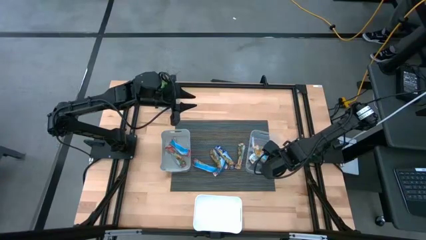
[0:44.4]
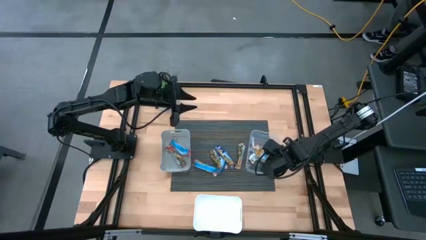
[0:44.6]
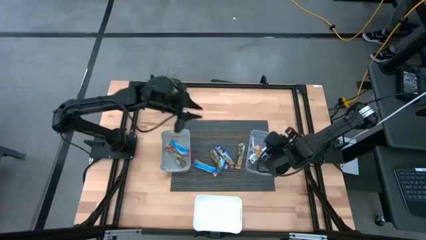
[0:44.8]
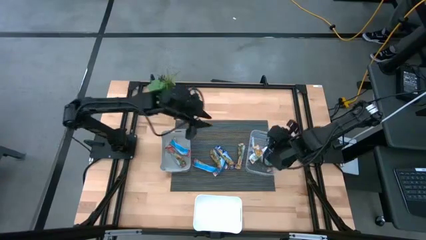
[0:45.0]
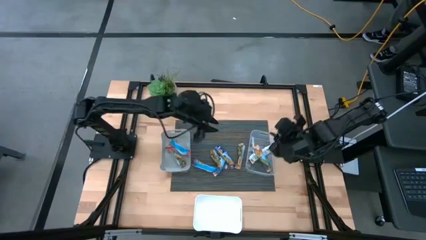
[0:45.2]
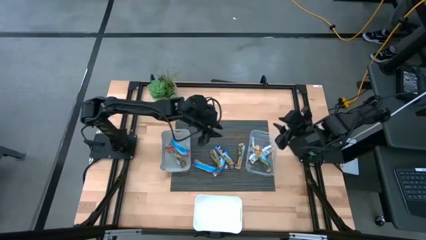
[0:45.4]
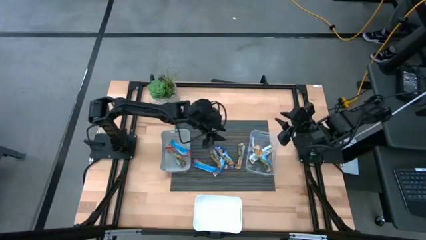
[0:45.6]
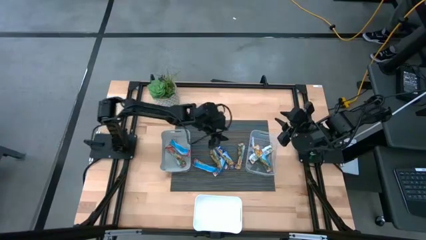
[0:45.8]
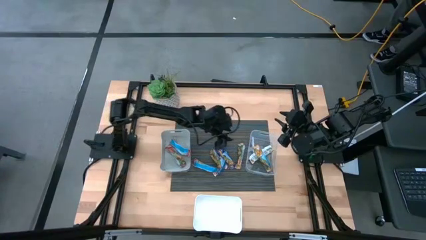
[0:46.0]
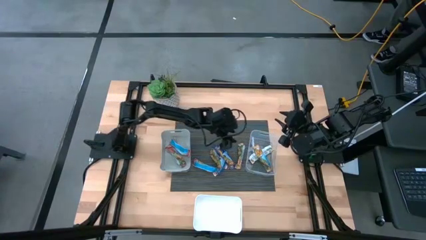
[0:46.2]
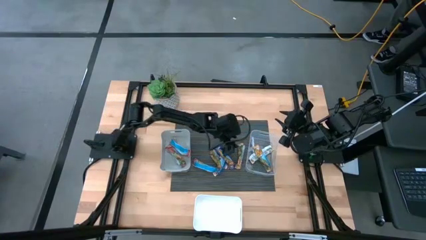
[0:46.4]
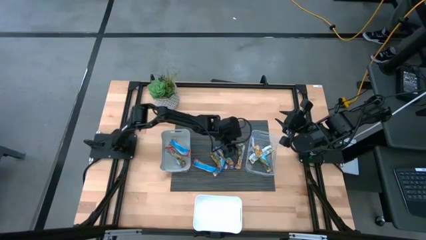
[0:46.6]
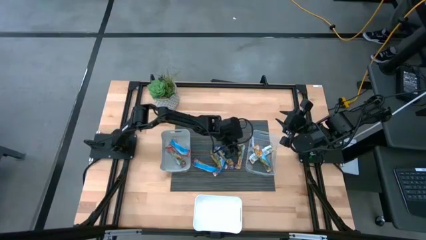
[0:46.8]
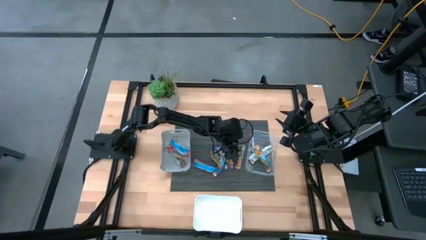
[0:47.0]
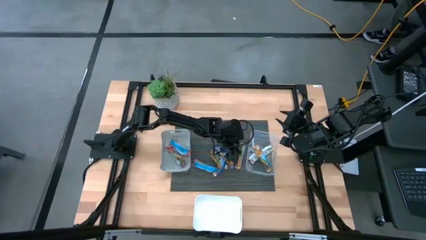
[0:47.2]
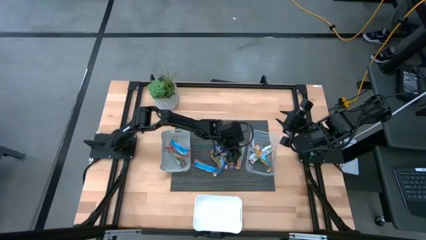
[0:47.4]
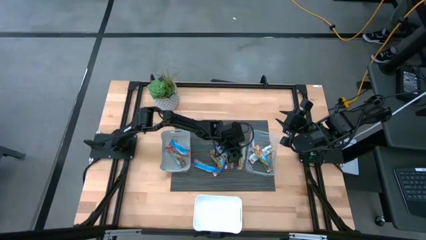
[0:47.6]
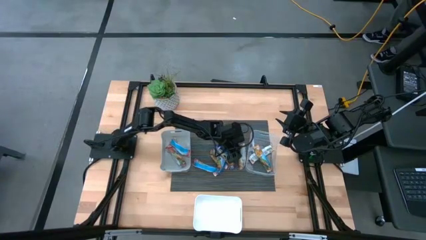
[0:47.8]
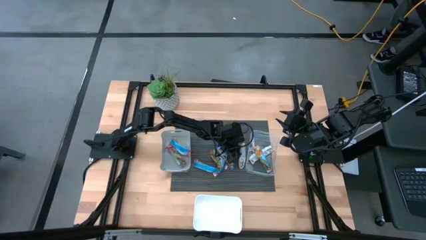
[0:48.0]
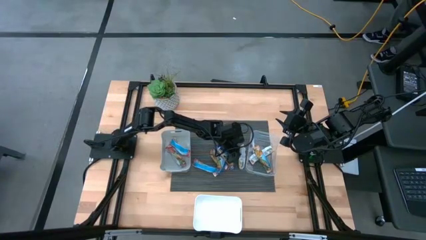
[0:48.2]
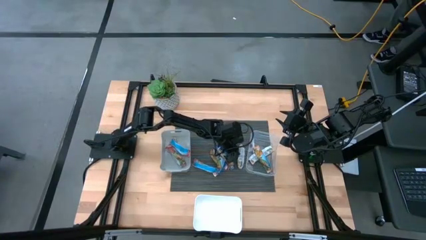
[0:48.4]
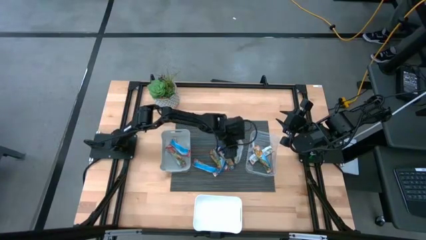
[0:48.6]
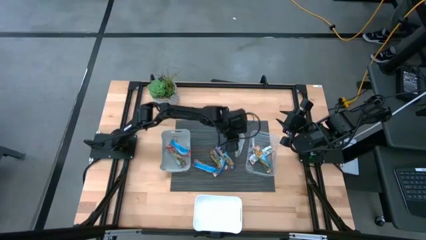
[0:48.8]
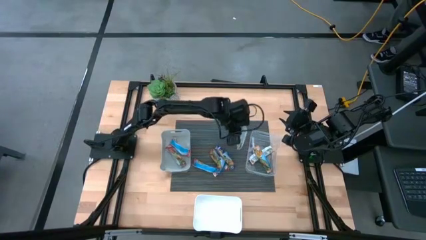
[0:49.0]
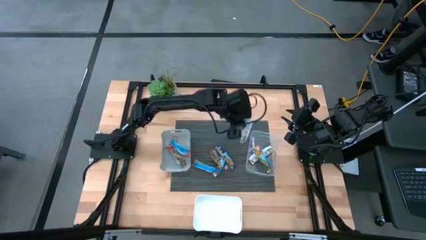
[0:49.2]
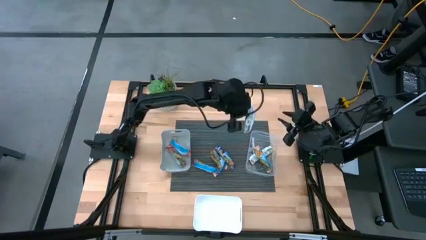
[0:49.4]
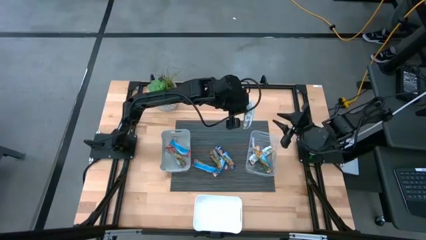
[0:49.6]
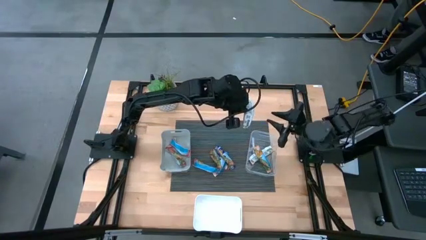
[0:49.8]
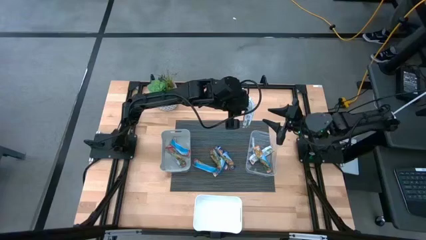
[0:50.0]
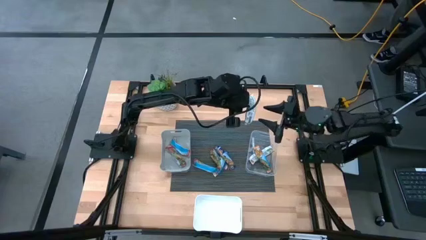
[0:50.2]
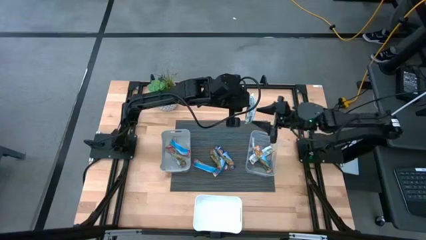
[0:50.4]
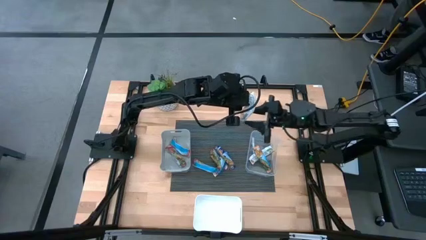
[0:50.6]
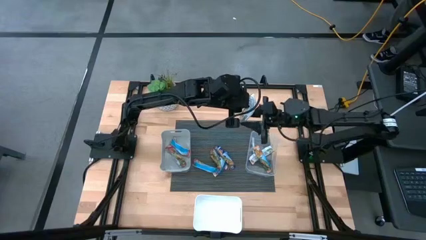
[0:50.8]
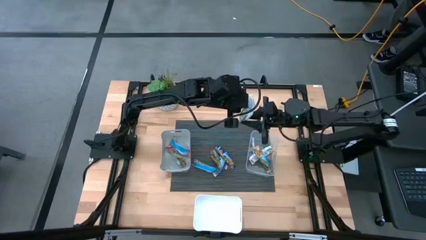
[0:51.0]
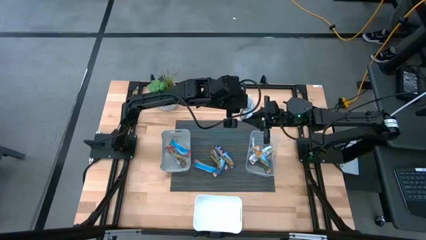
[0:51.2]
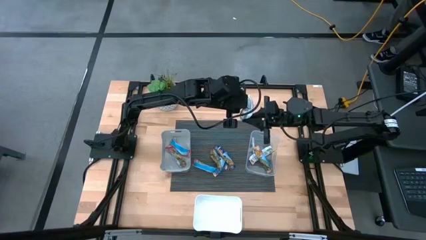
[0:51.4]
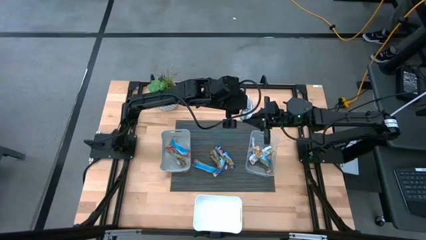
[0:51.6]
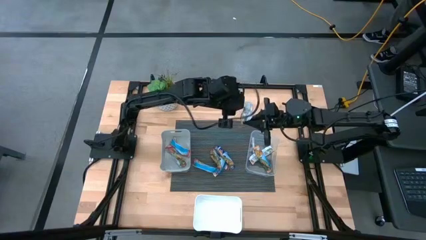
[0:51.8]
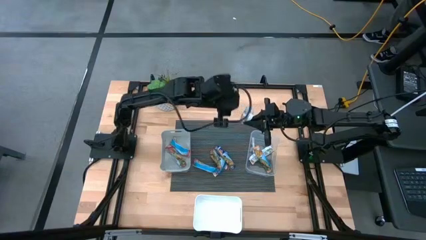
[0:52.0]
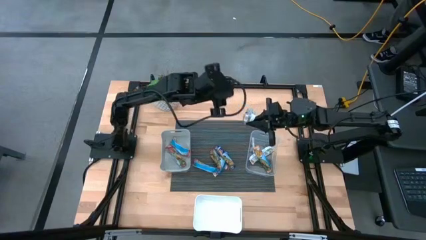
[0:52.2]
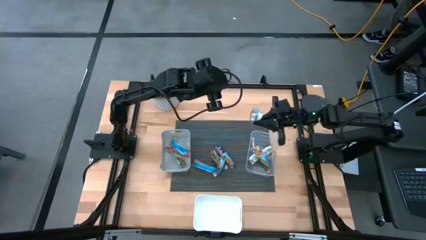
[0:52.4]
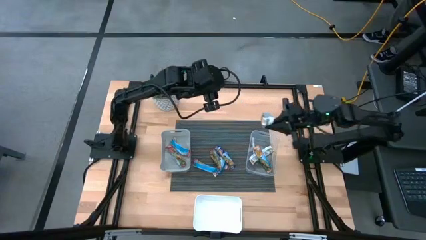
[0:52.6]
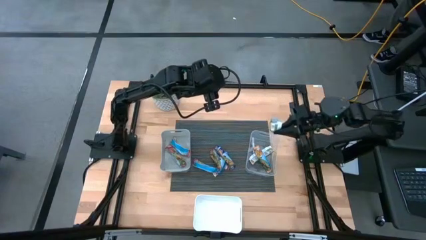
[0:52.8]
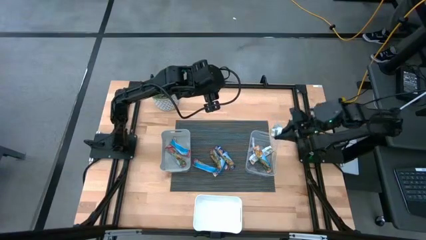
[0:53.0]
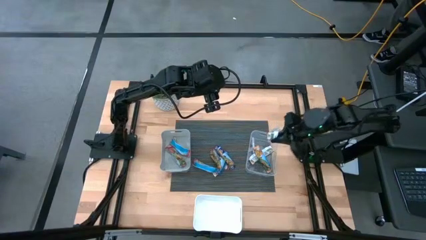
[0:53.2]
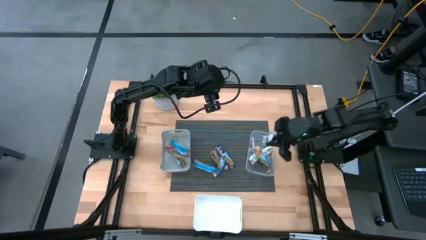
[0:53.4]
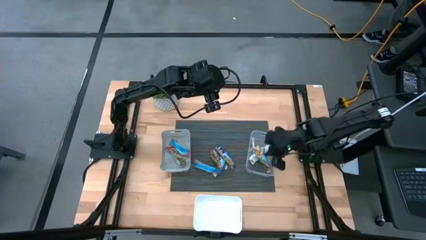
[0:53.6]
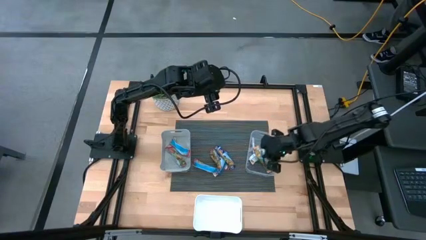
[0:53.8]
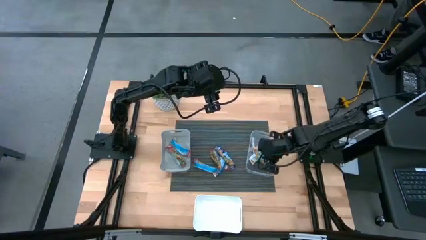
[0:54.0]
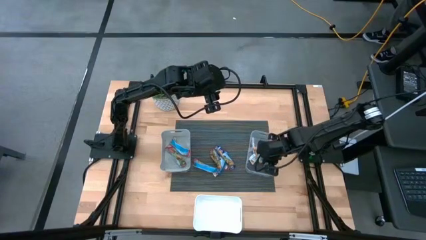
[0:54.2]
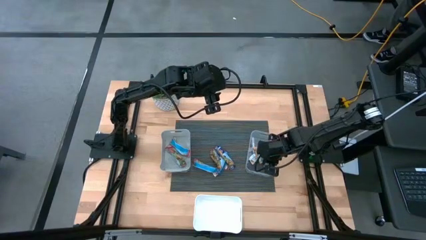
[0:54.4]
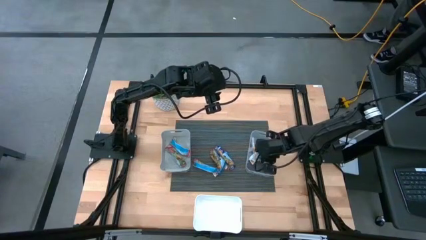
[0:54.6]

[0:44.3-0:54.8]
Task: Pick and place Granola Bars by type
Put the yellow granola bar into the transparent bin

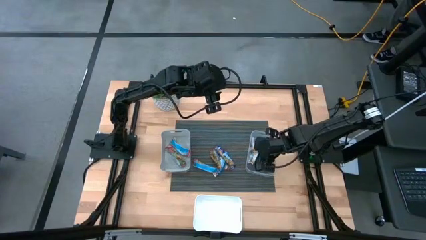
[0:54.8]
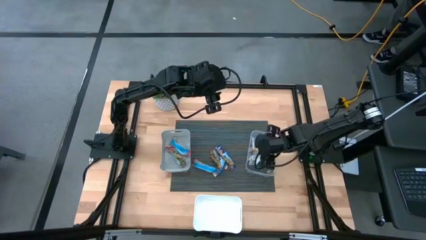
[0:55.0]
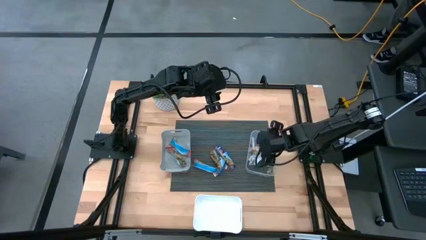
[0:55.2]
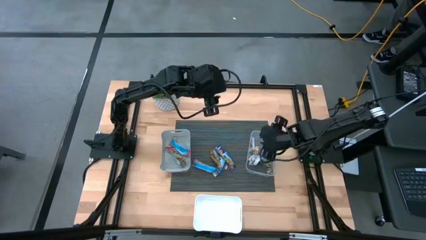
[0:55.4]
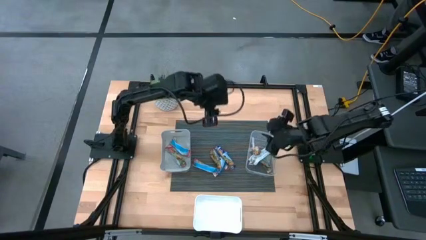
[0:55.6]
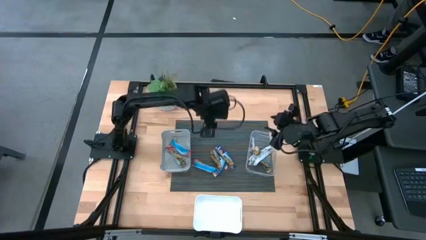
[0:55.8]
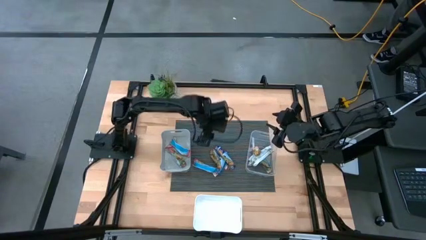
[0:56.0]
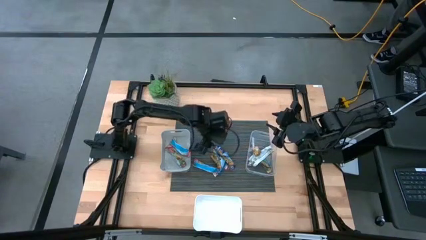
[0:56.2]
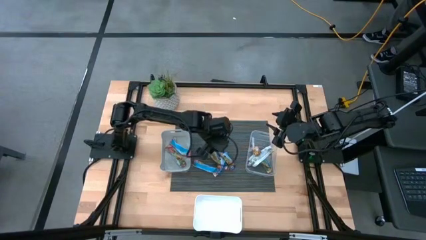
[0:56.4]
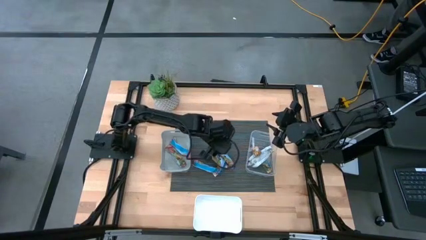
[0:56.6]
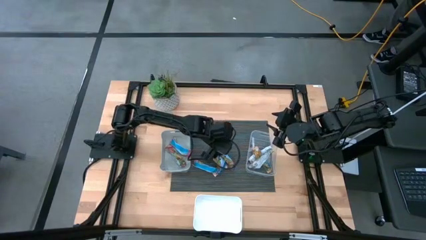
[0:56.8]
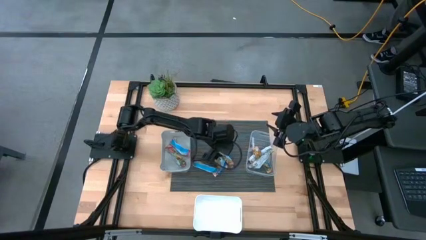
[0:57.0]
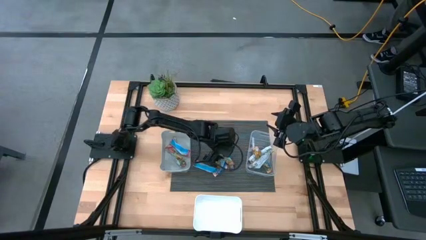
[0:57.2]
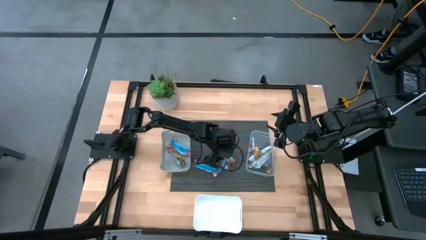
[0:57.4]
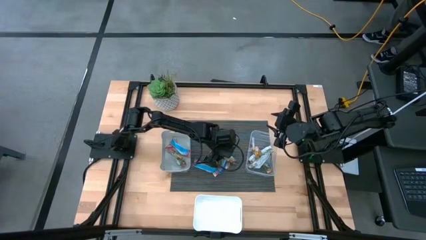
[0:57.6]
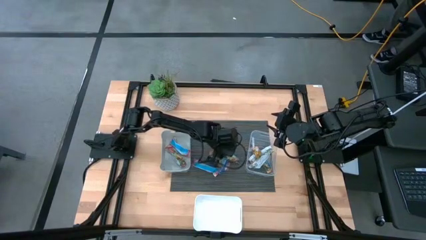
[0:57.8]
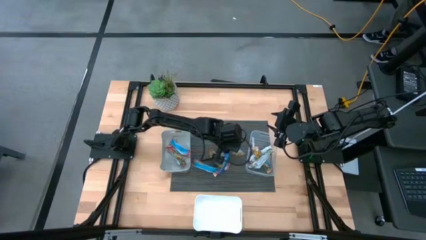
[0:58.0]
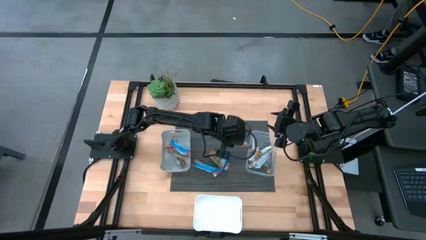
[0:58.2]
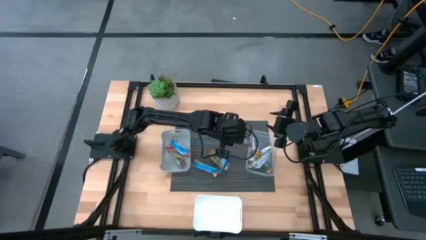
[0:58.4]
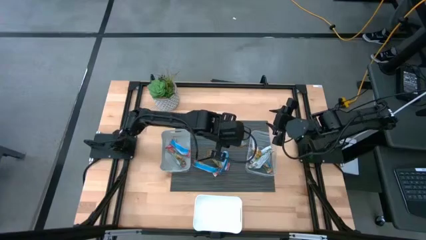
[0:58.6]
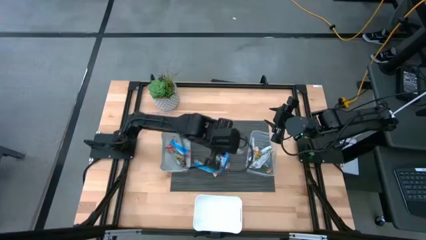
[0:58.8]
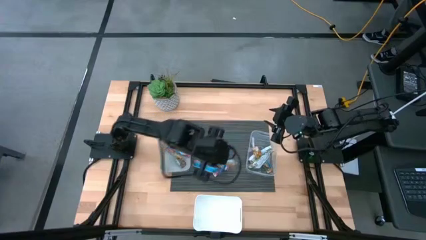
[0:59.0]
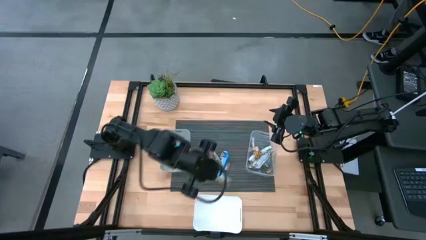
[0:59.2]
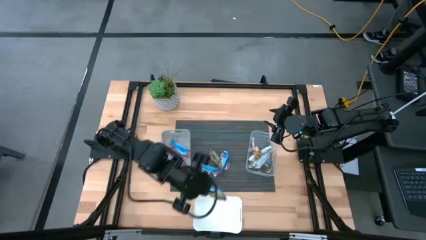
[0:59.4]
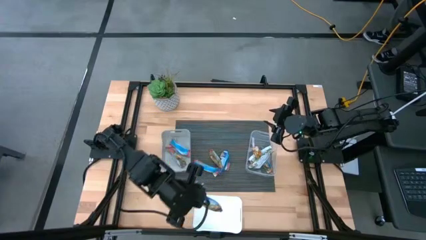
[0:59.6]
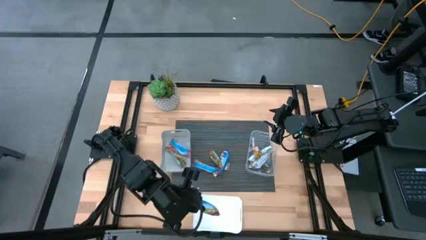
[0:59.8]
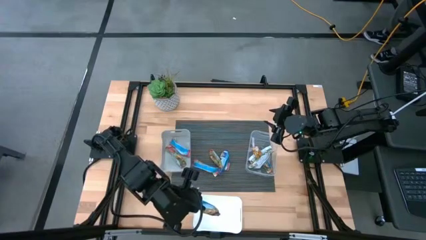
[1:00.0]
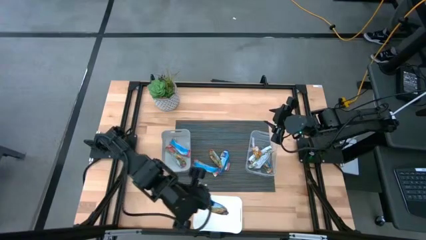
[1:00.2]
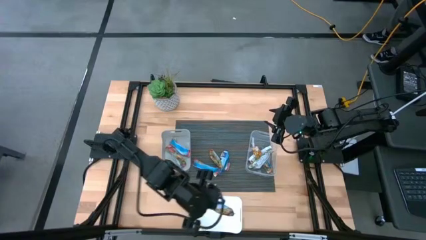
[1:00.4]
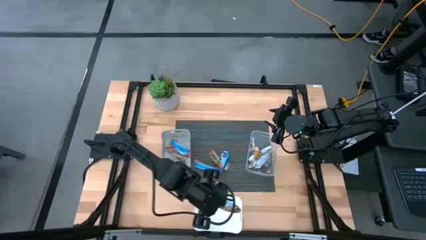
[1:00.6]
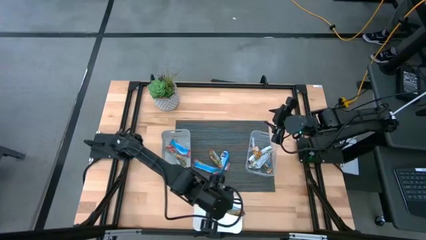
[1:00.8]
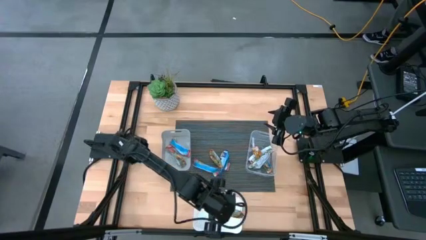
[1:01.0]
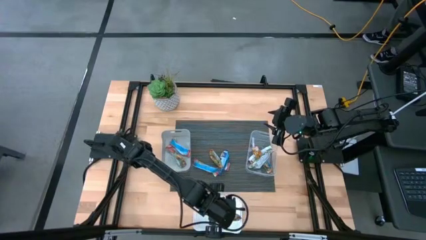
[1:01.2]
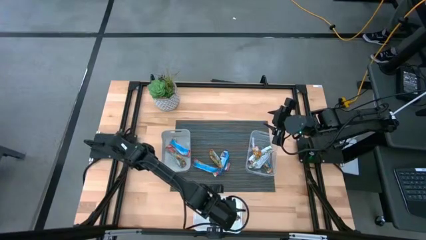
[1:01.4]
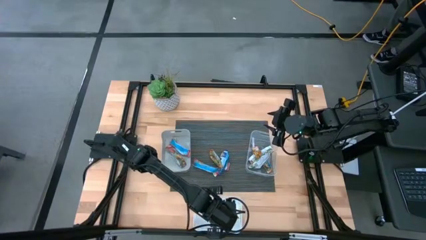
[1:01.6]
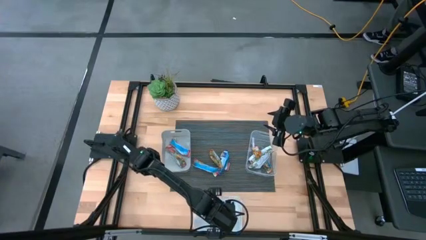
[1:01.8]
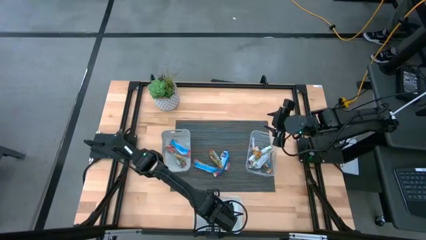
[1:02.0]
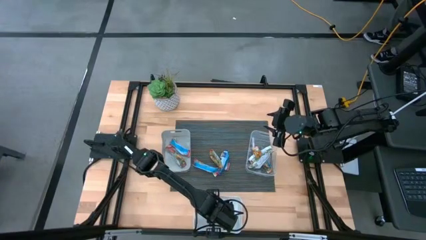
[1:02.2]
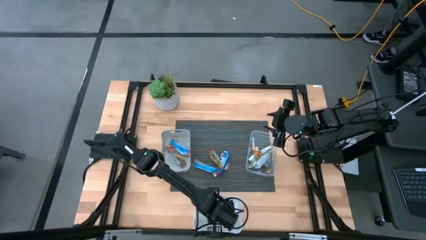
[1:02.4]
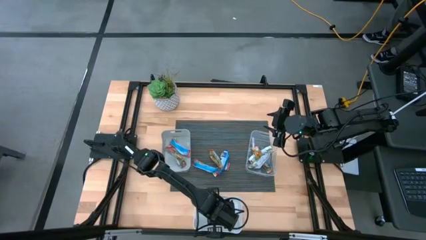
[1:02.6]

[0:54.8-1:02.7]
Put the blue granola bar into the white bin
